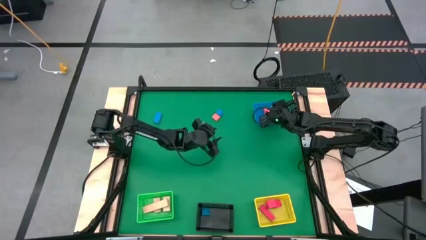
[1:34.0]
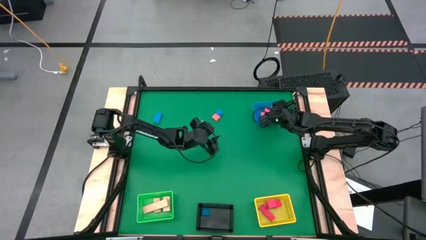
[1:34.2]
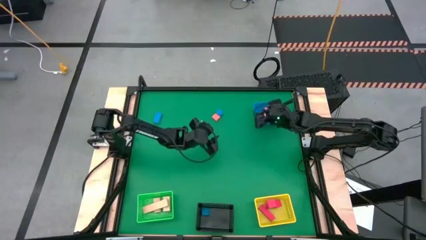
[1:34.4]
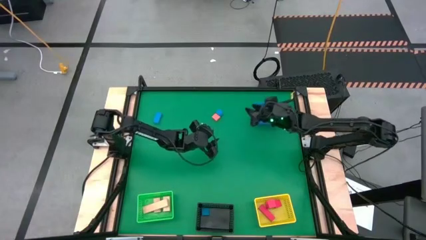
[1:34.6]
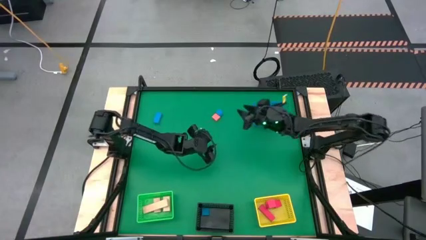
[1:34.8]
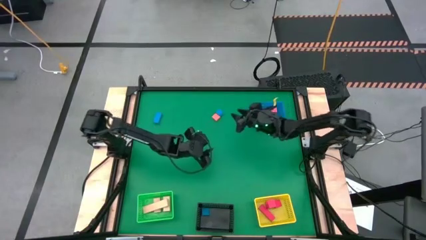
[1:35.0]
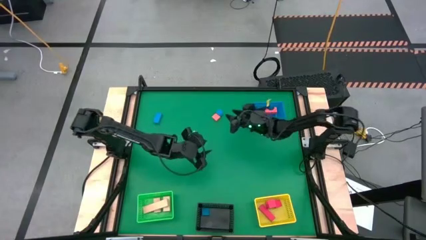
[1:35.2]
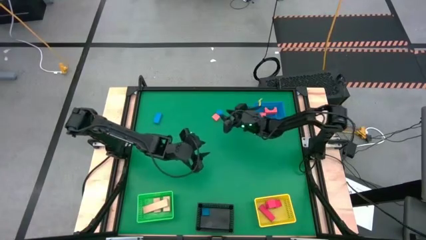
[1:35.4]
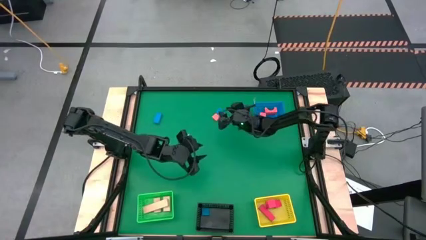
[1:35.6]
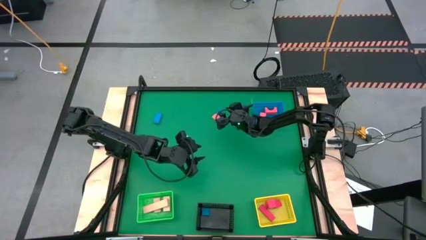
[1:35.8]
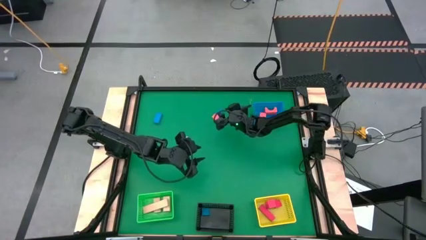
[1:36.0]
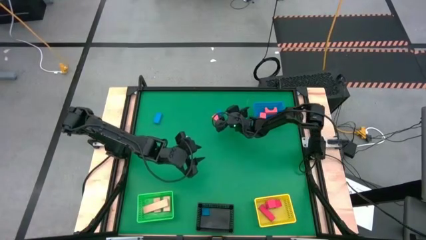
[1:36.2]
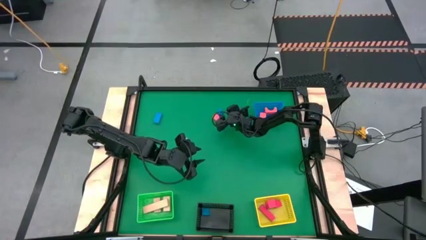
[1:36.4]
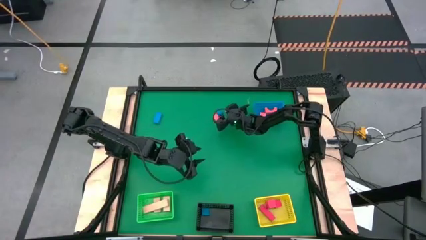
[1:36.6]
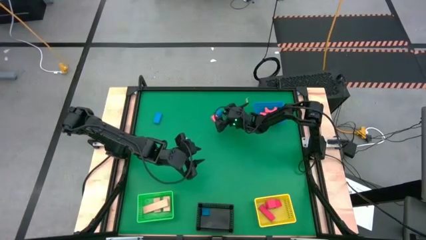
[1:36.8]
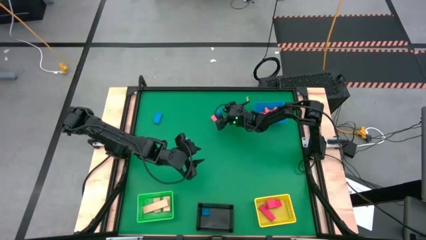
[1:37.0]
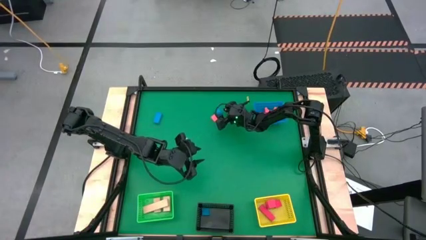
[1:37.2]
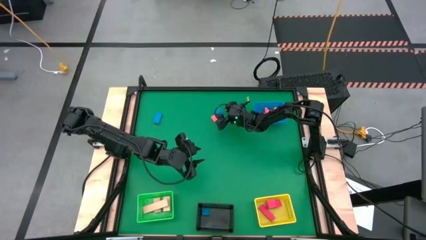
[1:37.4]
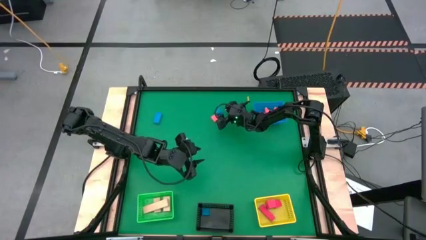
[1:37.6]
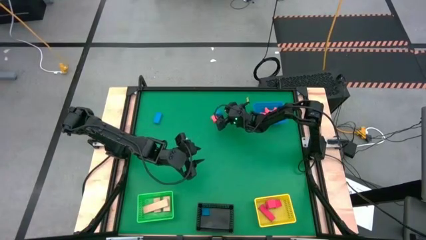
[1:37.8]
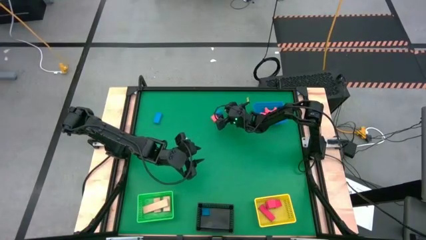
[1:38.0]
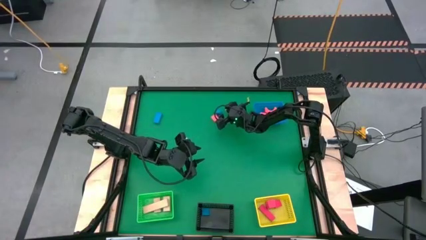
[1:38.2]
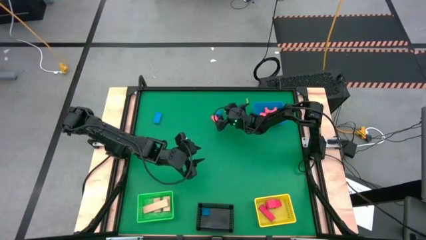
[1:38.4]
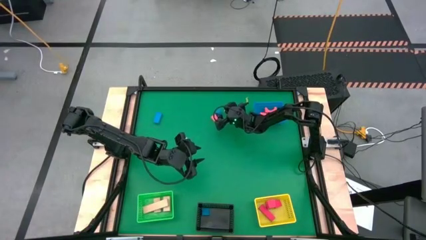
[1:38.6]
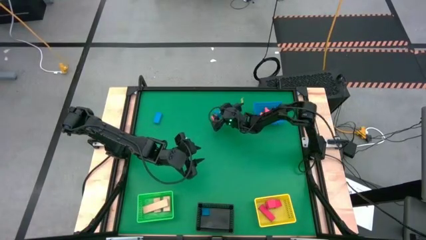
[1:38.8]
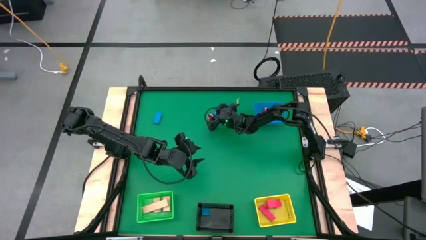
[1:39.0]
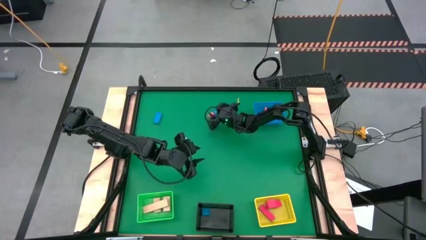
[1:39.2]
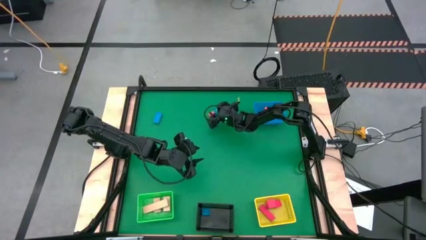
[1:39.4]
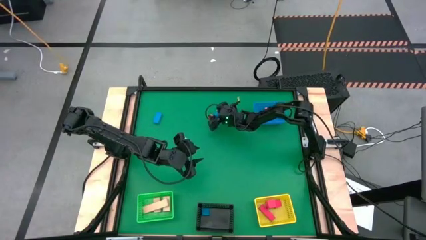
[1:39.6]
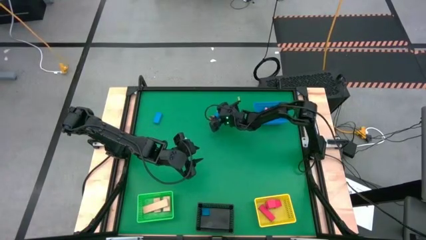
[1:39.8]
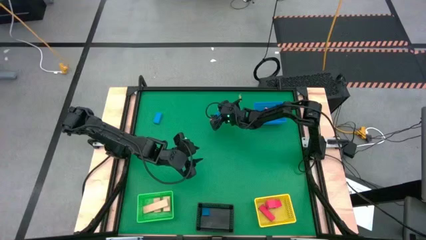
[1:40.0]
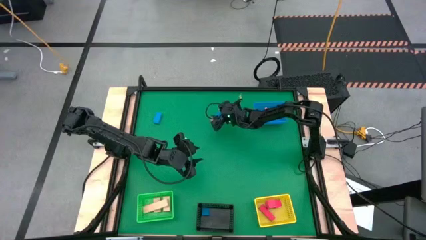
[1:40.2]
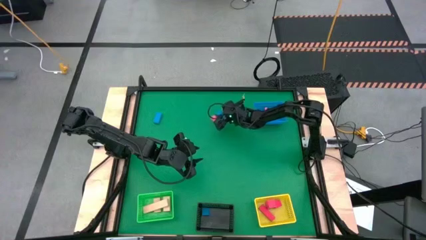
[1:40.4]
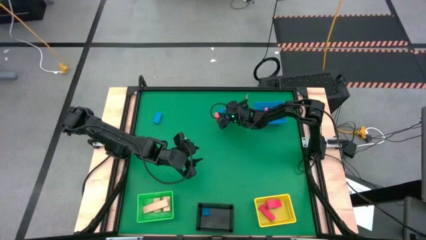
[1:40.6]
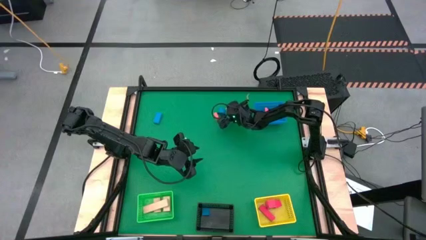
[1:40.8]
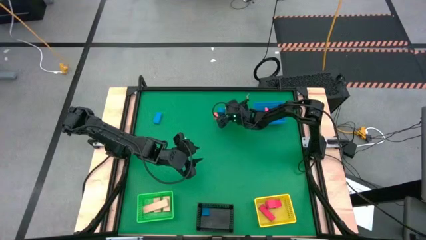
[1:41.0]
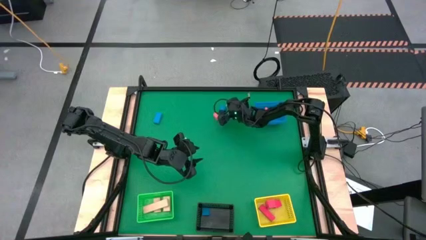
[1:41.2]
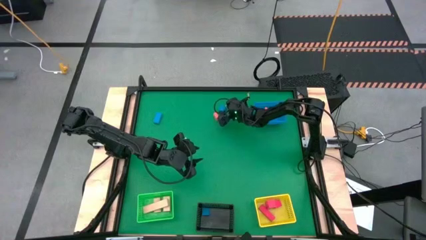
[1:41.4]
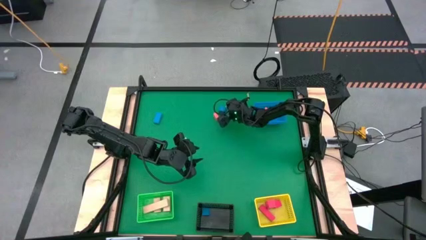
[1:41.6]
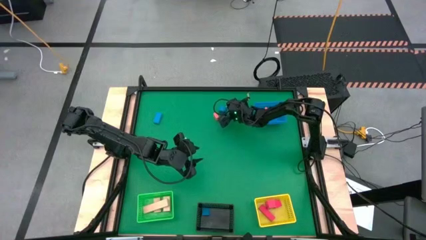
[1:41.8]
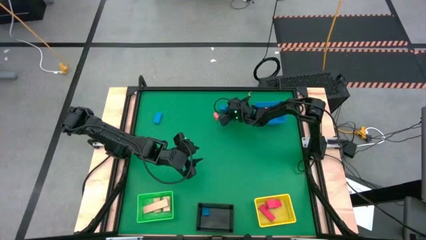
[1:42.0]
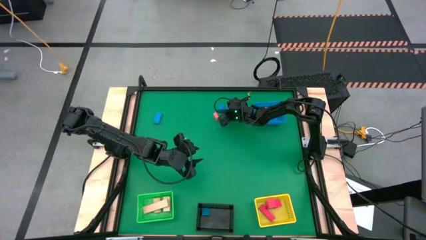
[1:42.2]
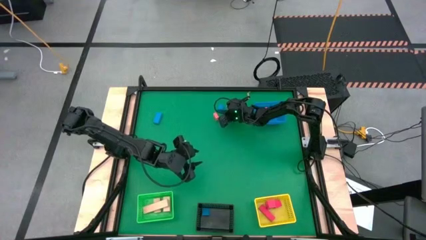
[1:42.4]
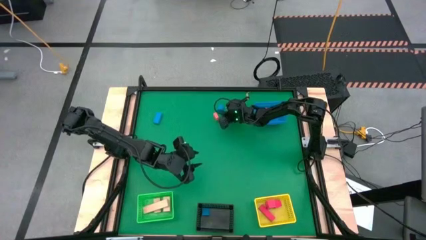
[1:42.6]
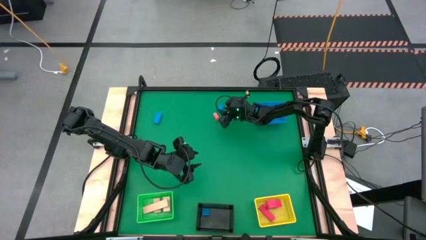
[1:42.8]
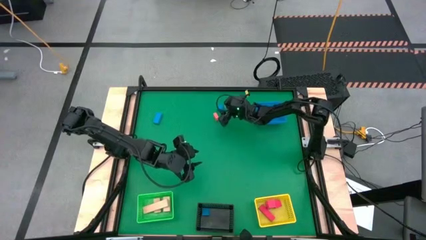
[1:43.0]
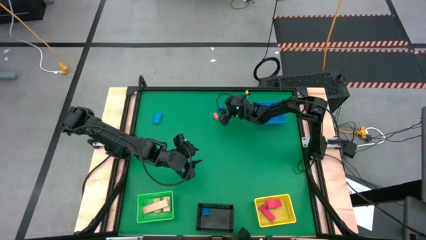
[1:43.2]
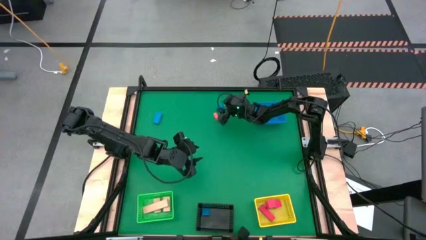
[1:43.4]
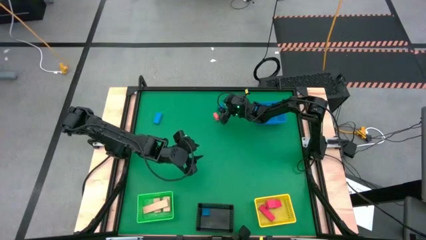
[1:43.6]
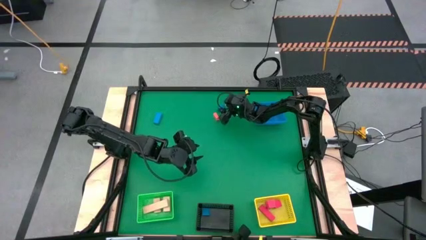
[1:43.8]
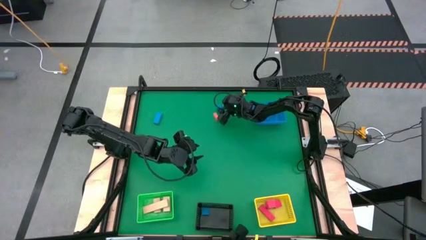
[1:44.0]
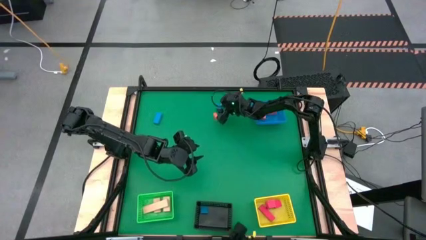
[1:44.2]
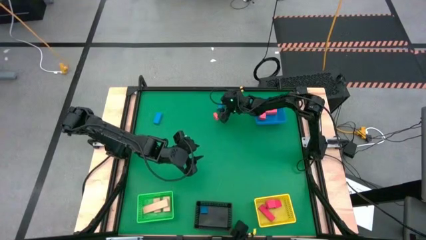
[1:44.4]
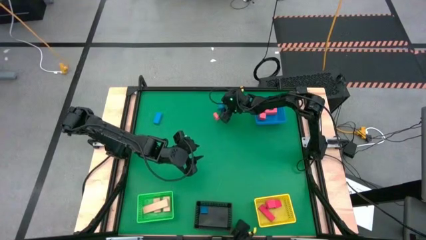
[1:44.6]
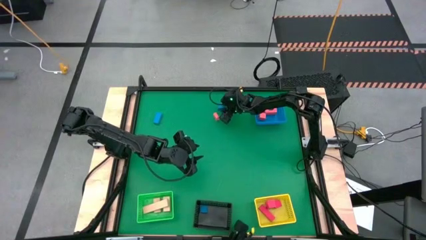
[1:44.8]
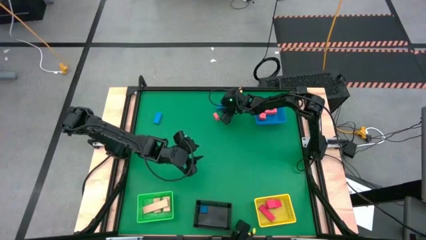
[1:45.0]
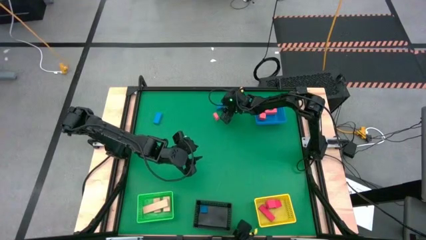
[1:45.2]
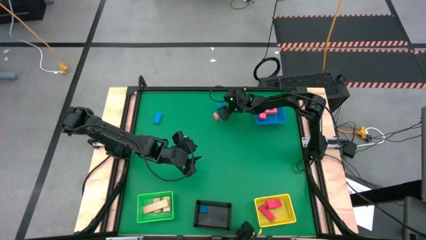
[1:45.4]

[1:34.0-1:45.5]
Task: Sort & place blocks by color
Put the blue block into the black bin

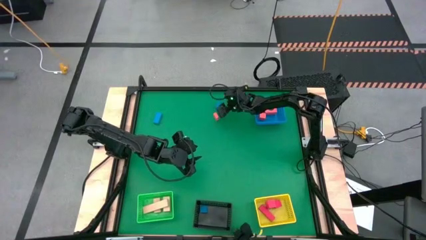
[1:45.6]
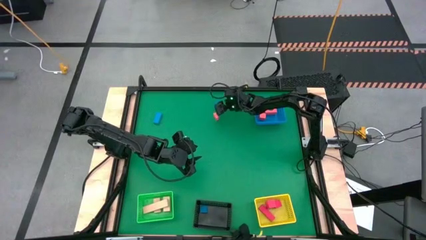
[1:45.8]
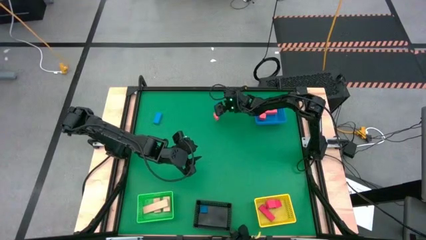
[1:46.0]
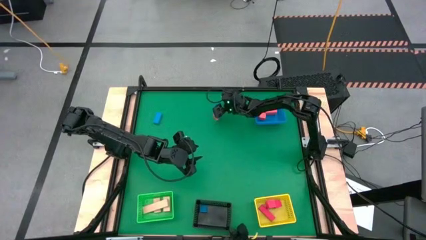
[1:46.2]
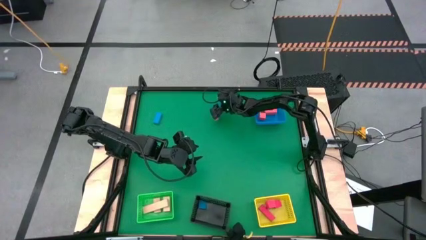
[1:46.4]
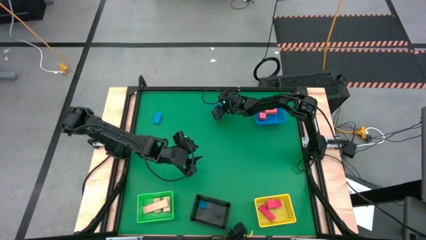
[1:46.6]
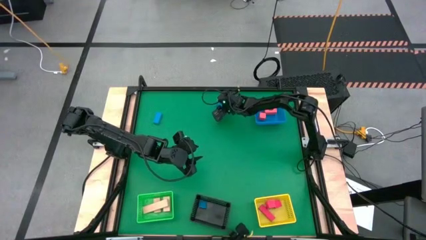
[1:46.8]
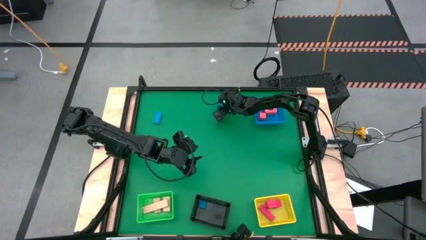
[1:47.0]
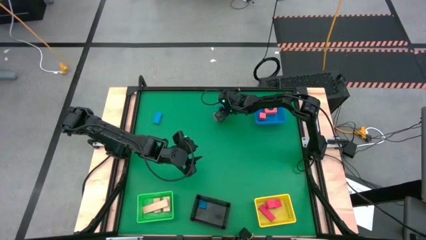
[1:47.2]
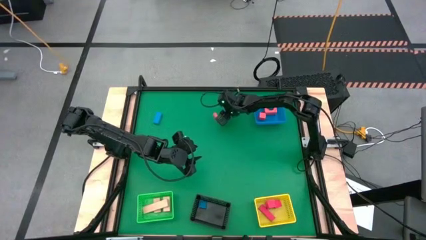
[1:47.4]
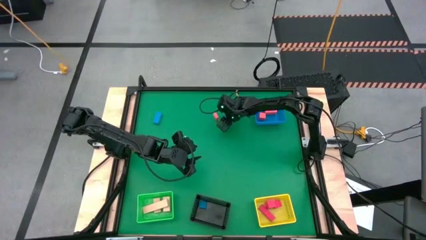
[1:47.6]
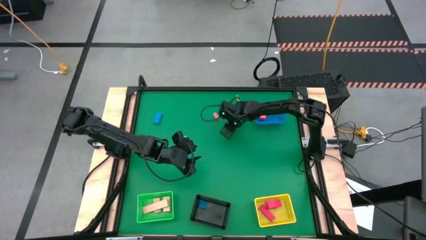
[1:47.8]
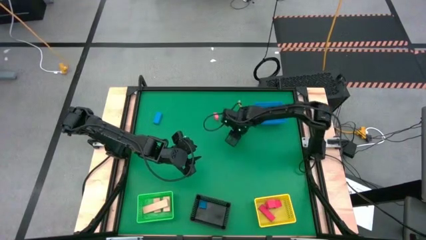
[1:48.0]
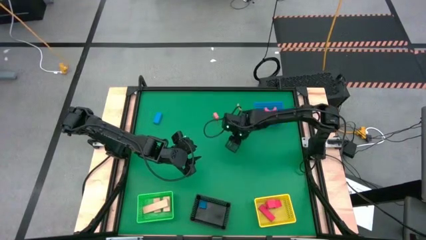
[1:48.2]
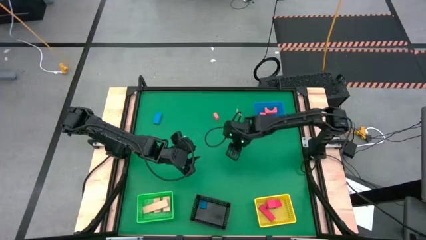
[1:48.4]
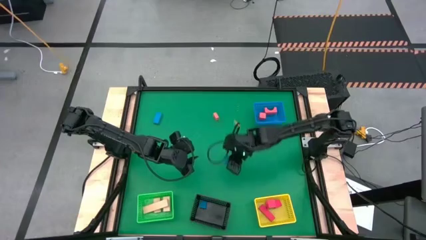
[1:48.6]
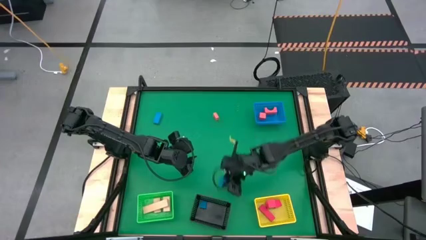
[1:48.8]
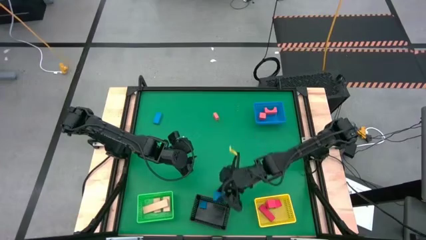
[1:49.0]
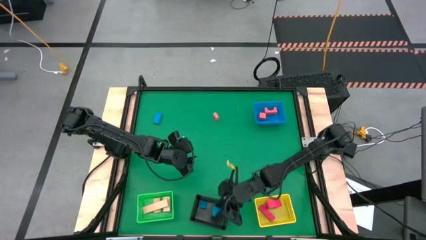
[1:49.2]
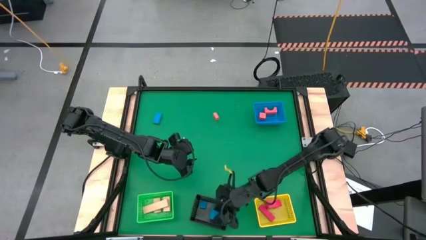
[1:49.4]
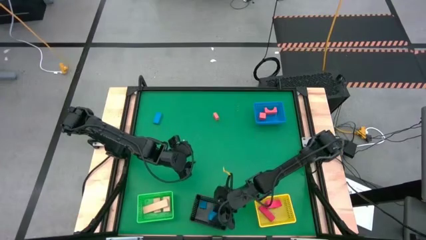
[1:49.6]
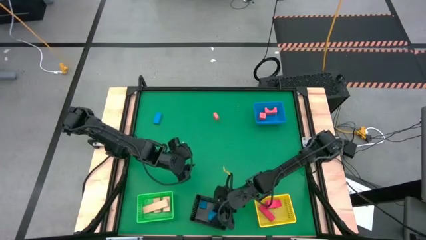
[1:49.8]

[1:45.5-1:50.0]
Put the blue block into the black bin
